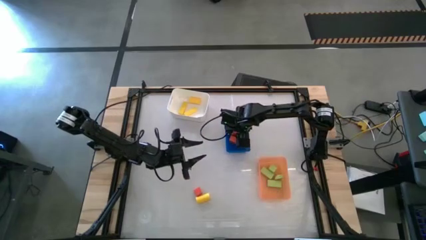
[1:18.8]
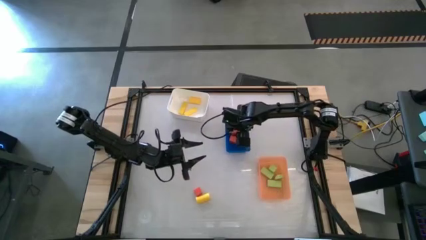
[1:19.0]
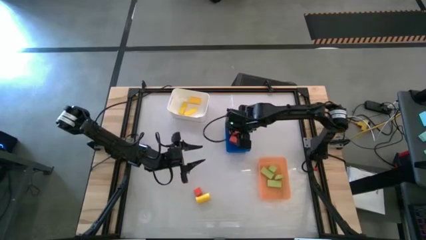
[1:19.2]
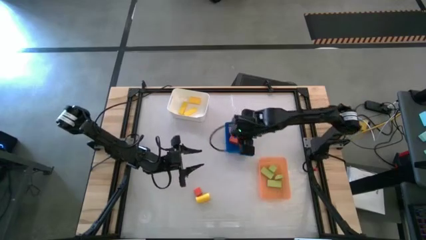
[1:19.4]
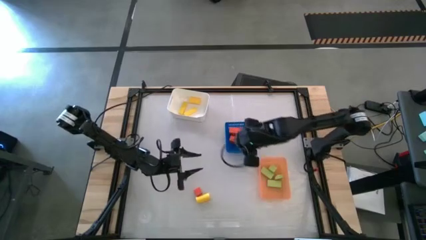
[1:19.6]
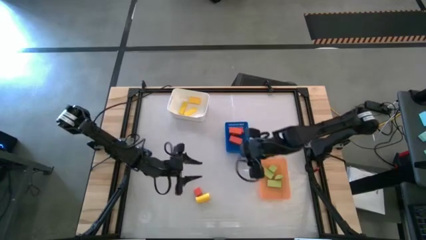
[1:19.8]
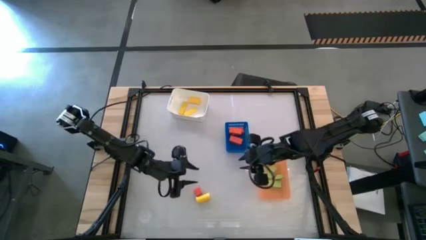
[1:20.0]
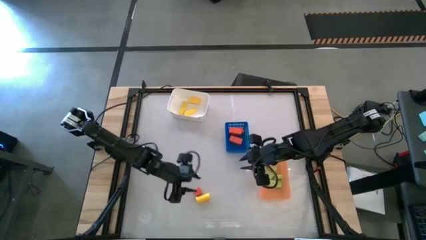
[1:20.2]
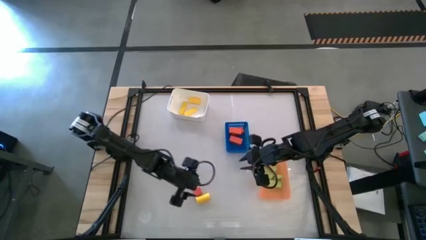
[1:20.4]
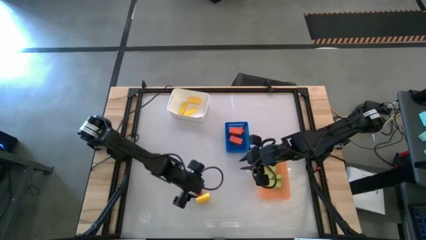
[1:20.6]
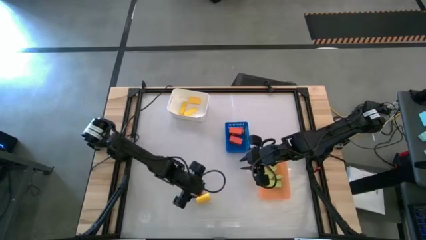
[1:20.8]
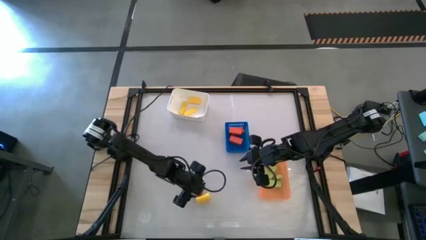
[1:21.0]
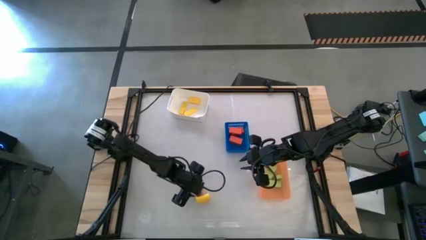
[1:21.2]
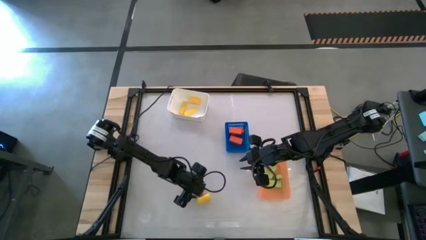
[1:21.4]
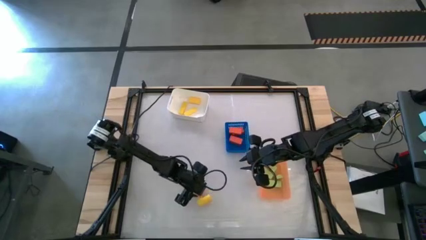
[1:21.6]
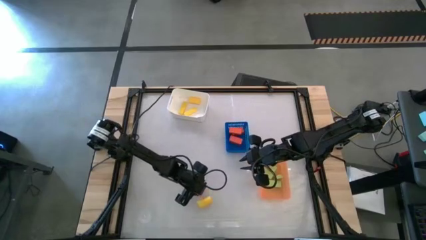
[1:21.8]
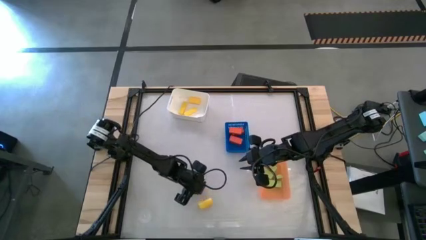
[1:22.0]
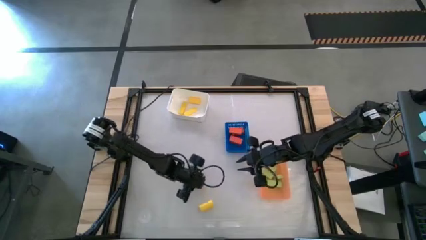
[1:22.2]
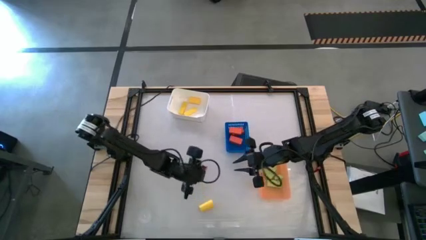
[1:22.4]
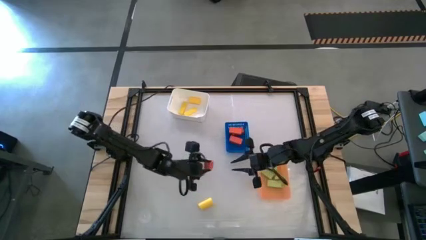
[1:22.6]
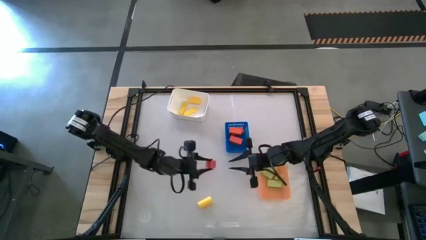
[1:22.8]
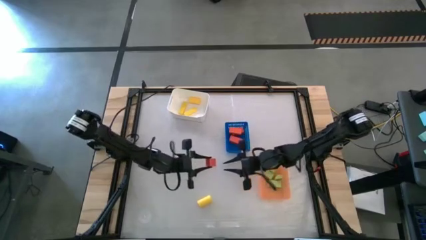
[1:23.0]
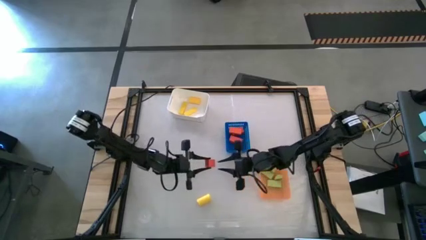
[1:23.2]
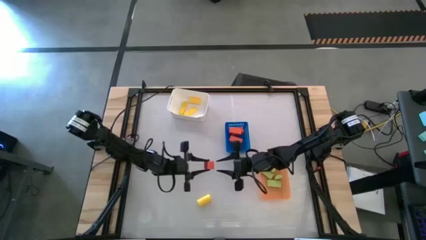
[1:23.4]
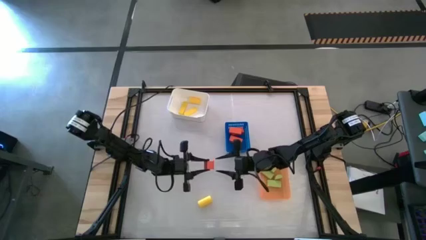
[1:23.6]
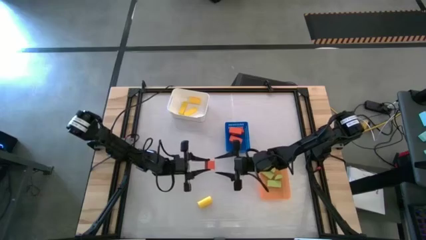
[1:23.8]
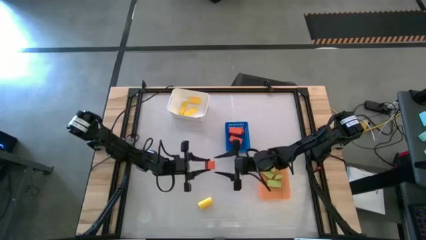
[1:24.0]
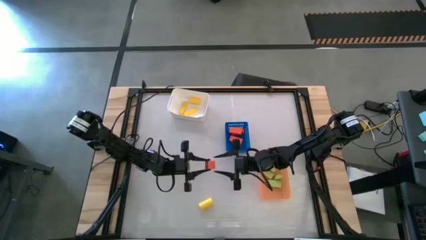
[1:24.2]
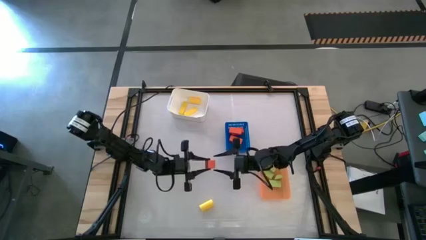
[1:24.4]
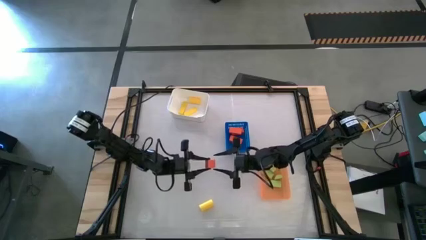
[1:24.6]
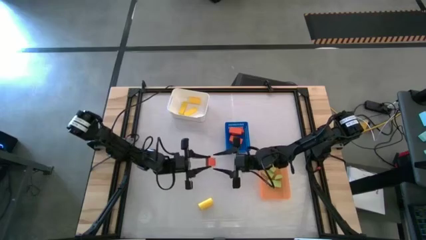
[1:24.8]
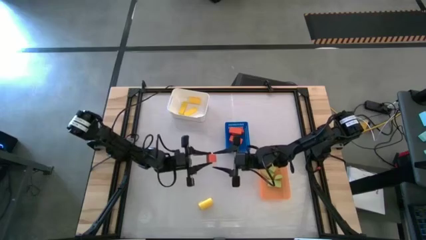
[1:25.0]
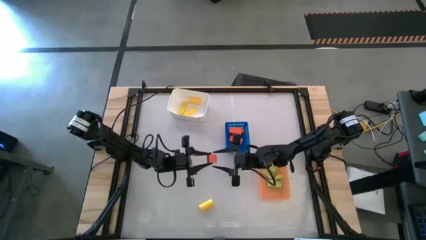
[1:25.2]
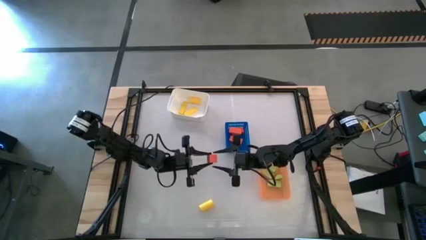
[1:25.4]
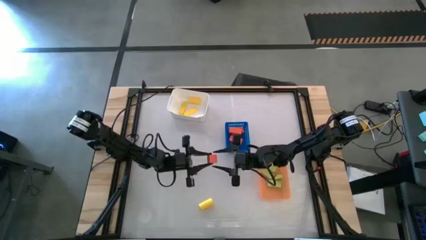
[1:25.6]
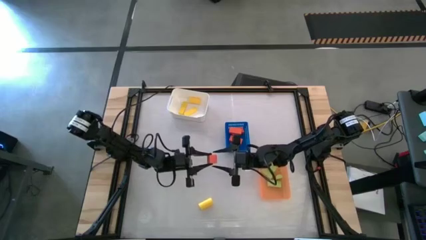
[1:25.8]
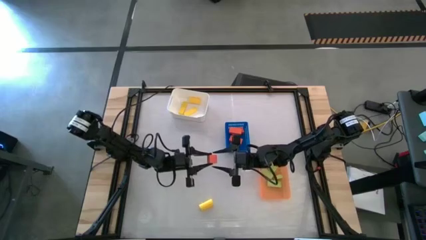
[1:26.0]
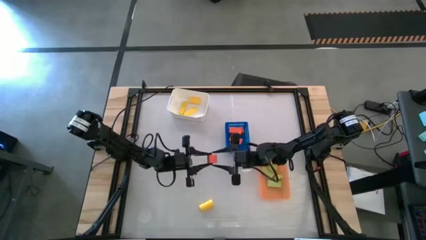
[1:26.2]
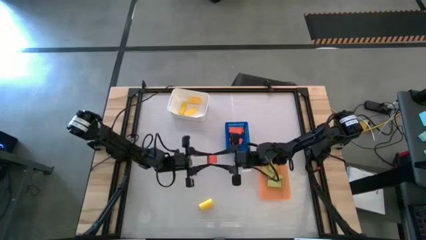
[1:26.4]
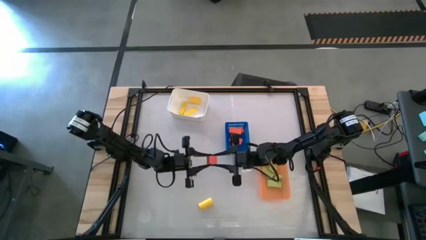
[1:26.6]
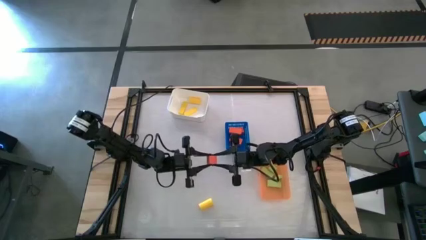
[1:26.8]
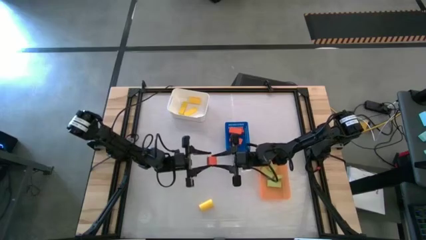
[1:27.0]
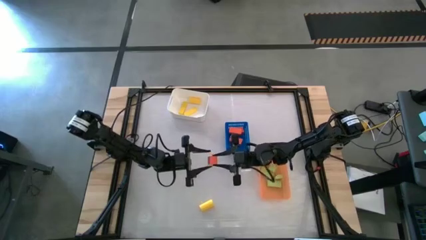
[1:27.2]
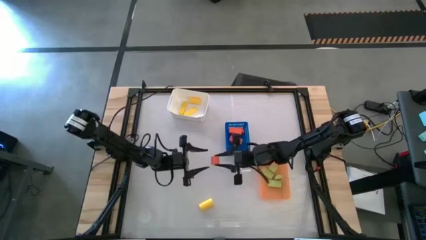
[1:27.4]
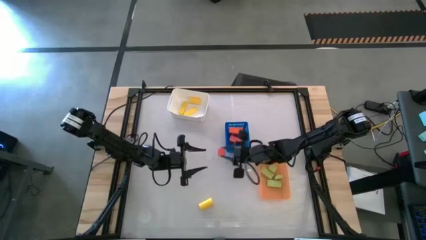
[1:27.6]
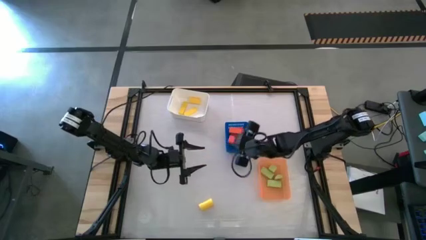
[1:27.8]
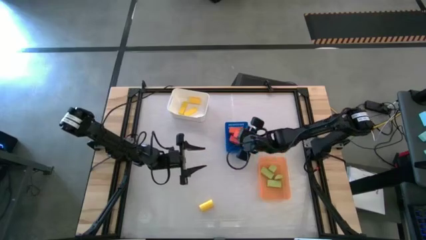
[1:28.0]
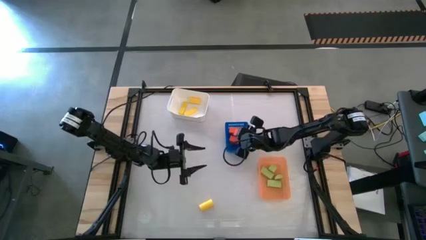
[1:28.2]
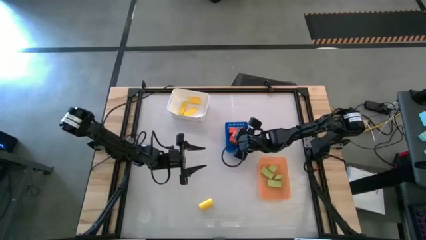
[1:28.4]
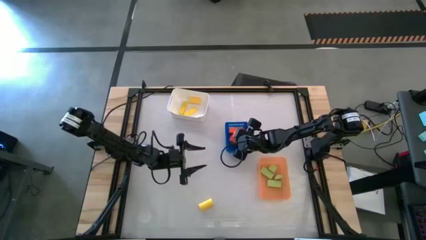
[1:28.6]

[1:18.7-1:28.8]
Task: Sort & place blocks by color
Put the orange block into the blue bin

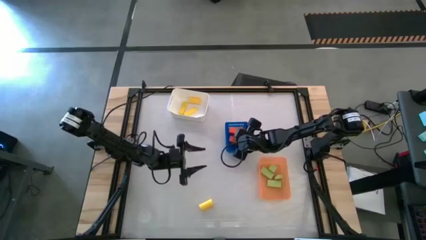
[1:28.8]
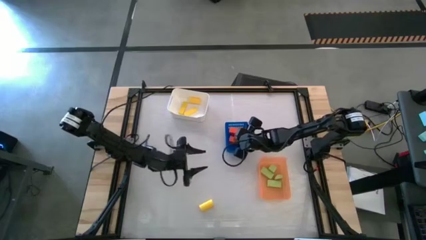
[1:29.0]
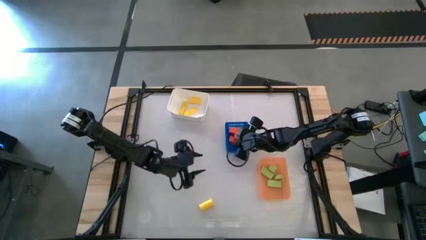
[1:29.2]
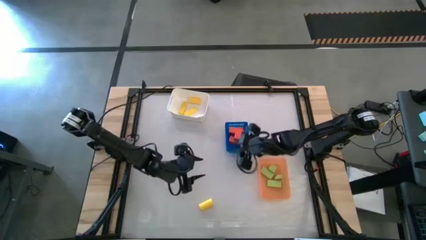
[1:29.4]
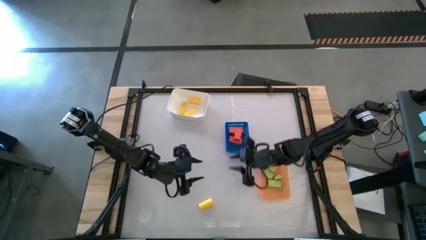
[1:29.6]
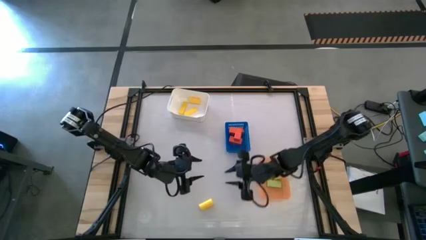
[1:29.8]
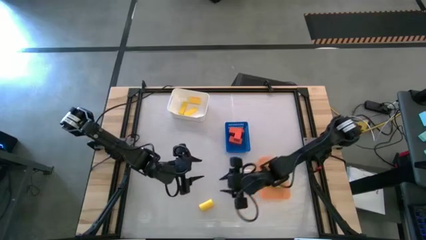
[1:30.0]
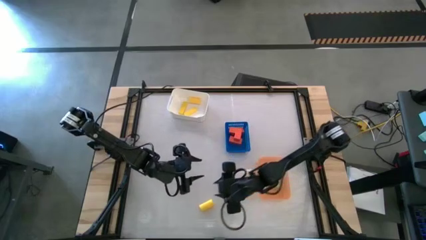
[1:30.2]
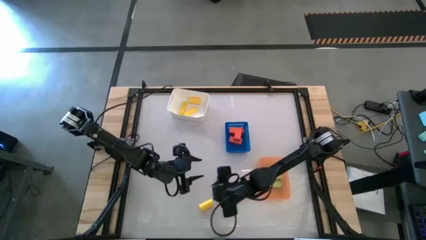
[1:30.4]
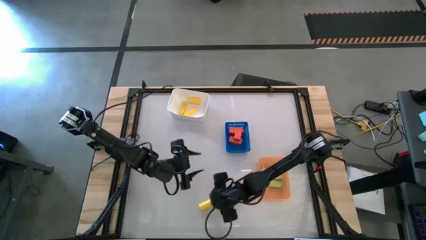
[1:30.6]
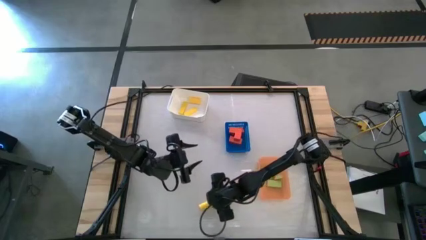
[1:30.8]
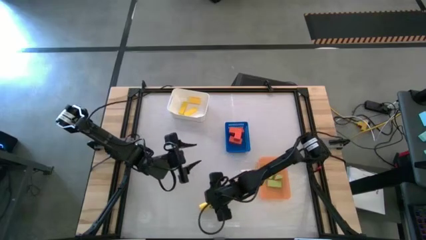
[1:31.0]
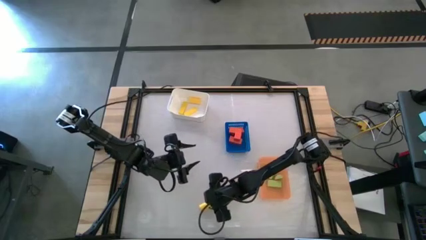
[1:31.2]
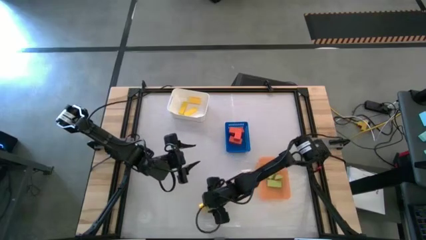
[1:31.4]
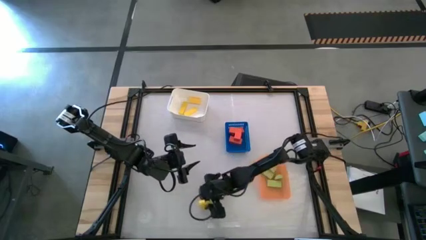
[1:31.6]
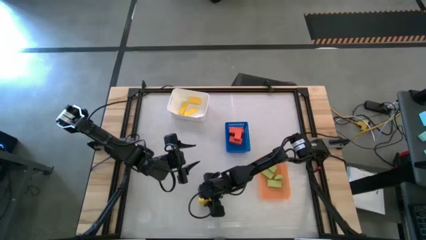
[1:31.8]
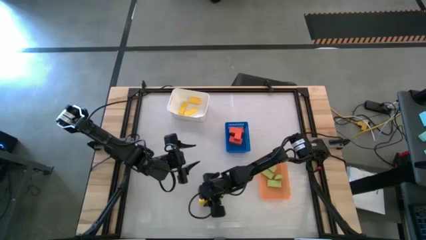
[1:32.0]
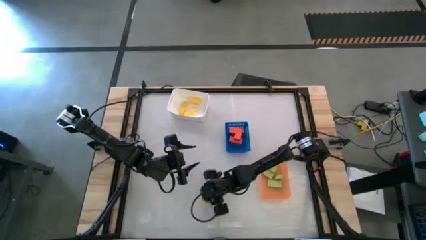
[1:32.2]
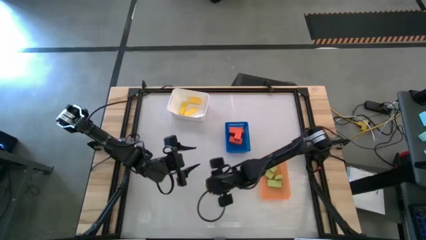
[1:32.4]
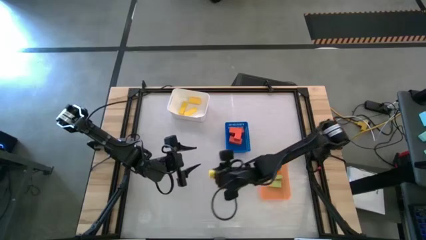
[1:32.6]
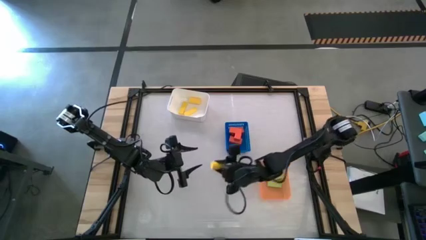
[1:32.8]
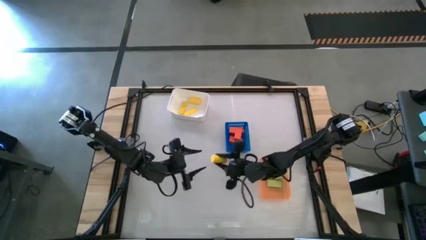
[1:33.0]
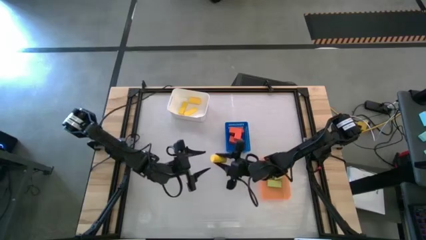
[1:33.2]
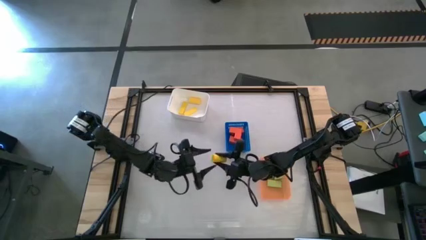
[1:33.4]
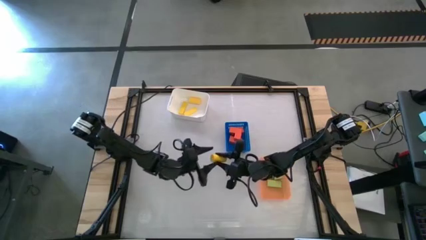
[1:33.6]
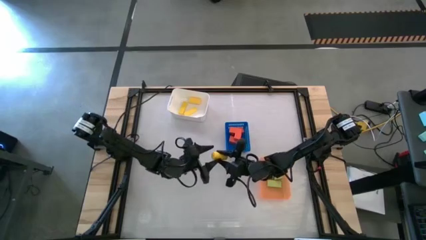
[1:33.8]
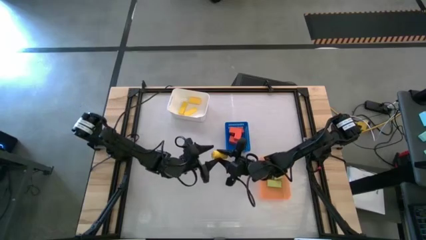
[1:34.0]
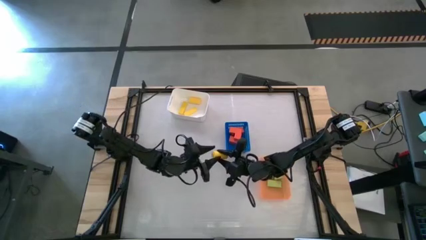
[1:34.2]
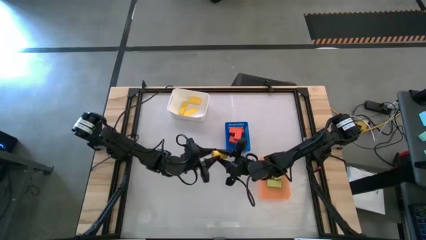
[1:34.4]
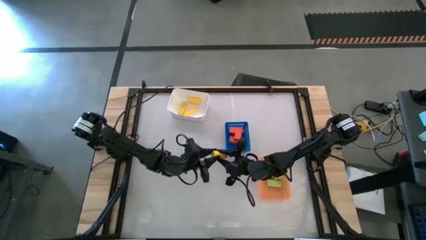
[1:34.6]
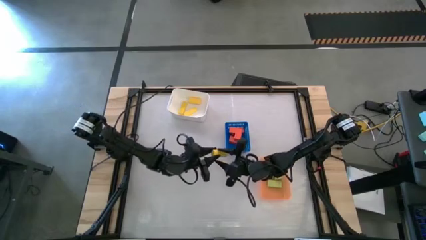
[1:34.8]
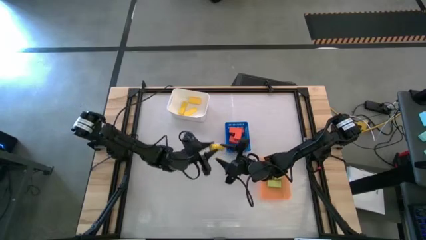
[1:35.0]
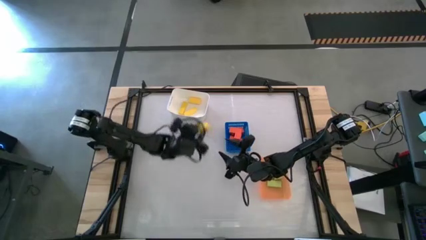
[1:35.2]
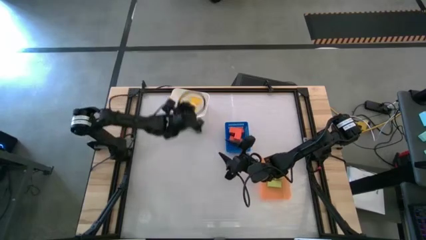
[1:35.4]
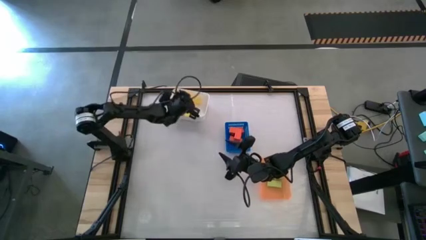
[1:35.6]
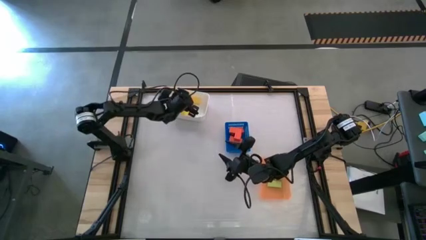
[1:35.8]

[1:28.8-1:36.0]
Put the yellow block into the white bin
